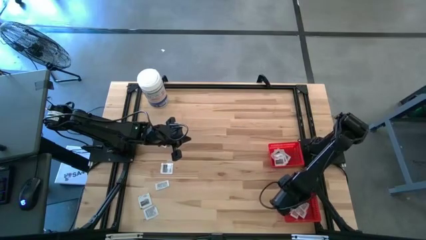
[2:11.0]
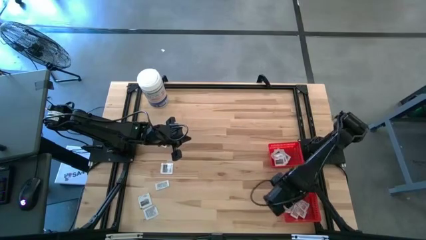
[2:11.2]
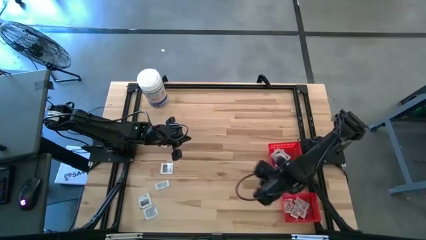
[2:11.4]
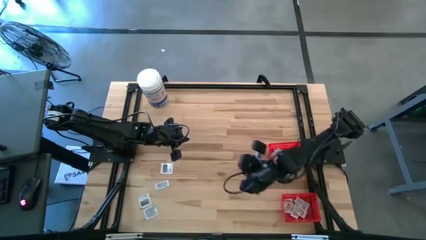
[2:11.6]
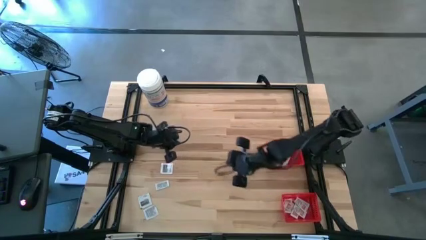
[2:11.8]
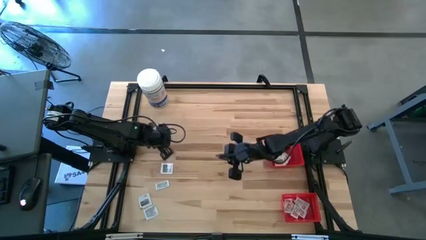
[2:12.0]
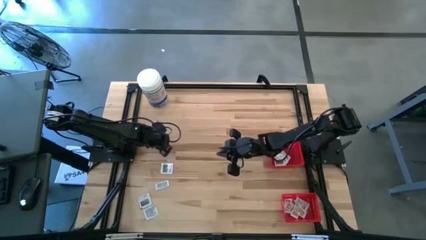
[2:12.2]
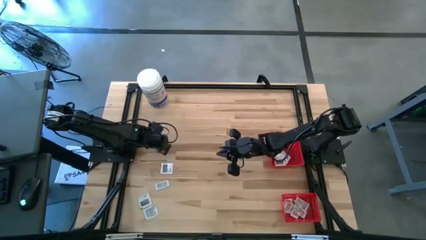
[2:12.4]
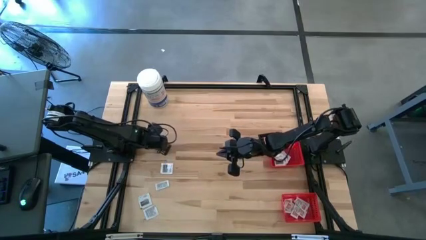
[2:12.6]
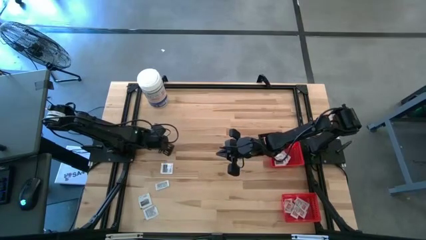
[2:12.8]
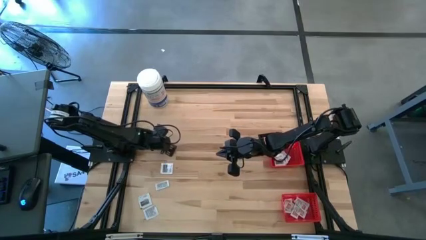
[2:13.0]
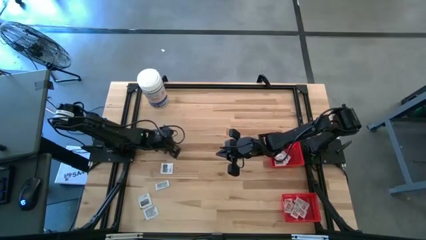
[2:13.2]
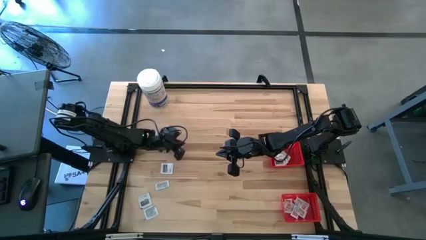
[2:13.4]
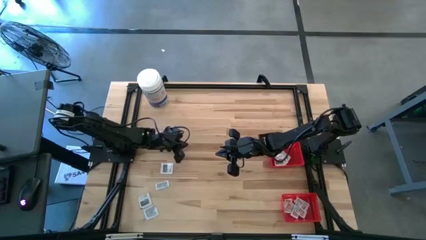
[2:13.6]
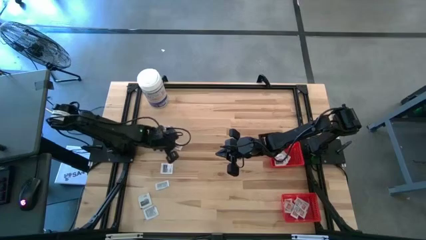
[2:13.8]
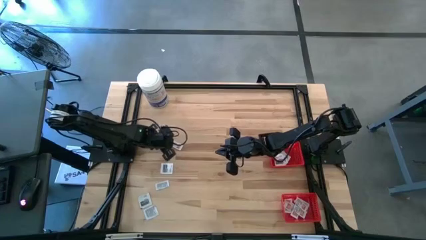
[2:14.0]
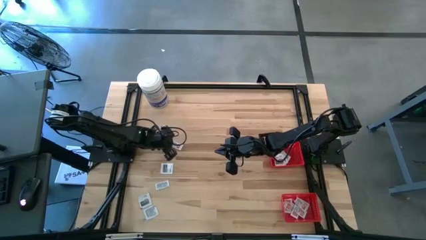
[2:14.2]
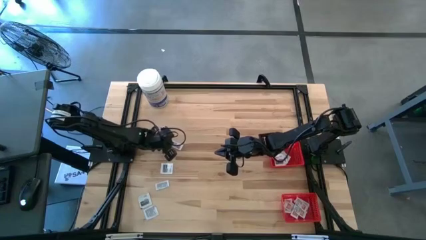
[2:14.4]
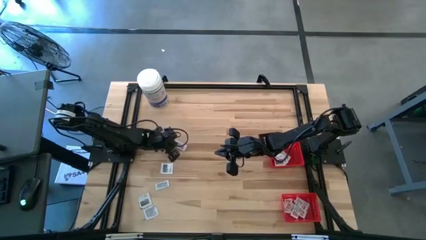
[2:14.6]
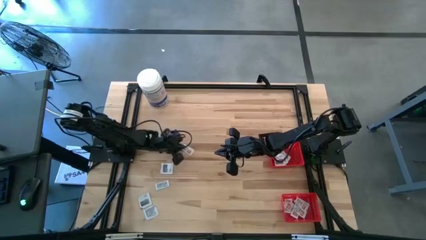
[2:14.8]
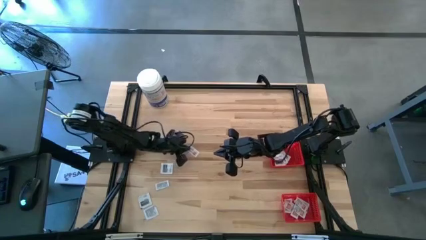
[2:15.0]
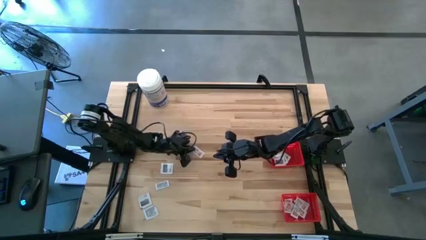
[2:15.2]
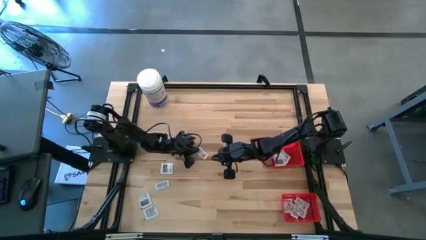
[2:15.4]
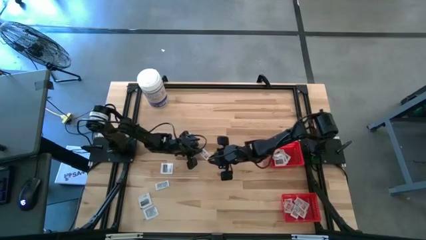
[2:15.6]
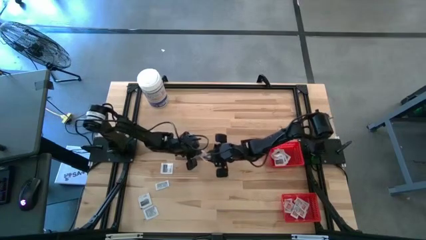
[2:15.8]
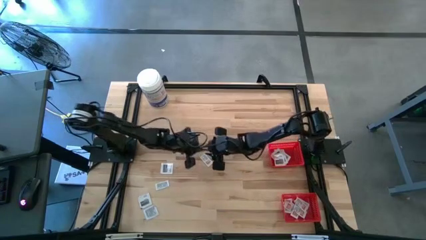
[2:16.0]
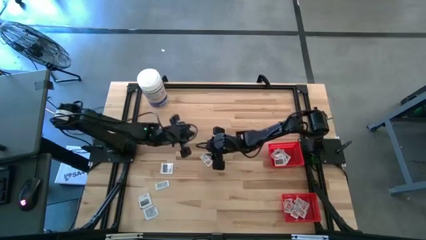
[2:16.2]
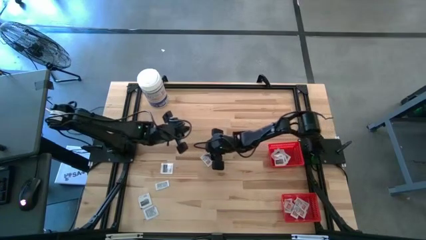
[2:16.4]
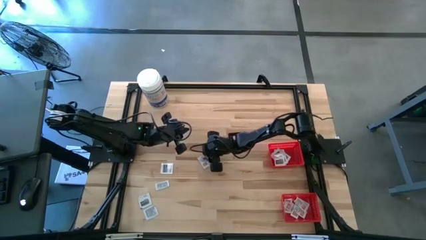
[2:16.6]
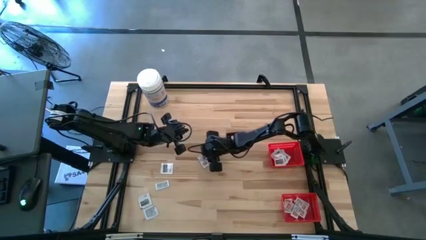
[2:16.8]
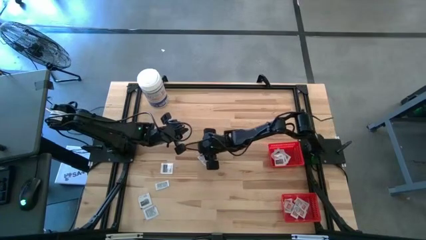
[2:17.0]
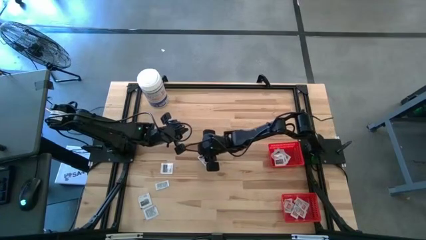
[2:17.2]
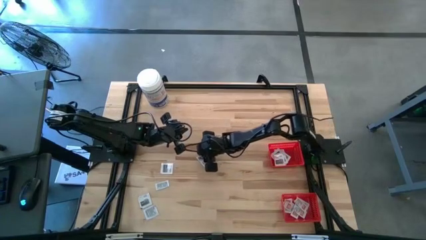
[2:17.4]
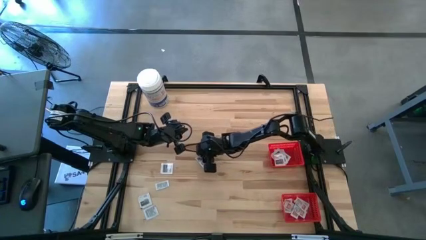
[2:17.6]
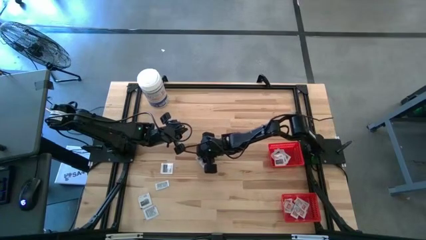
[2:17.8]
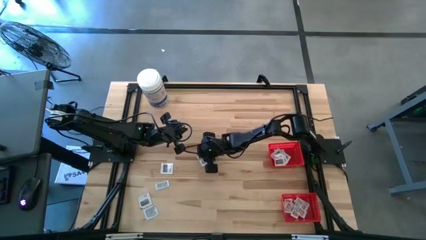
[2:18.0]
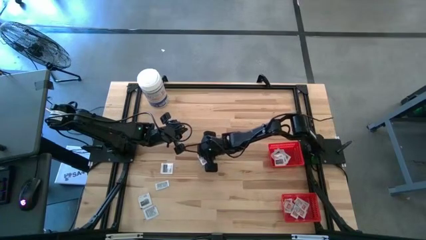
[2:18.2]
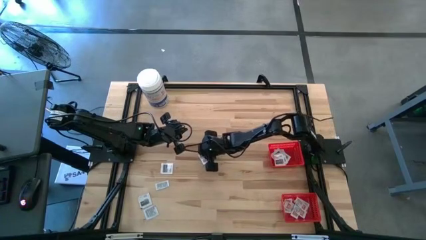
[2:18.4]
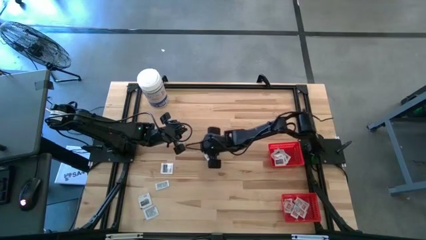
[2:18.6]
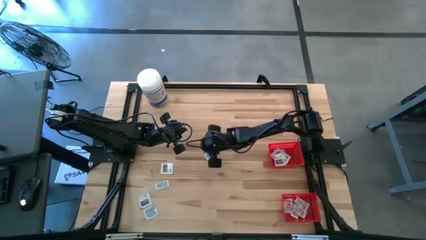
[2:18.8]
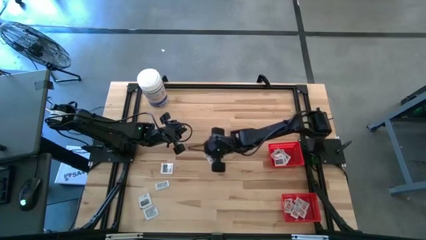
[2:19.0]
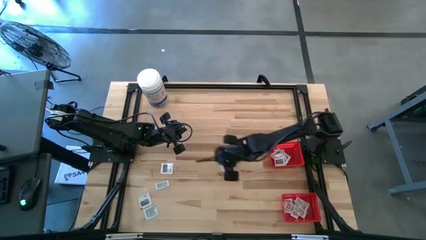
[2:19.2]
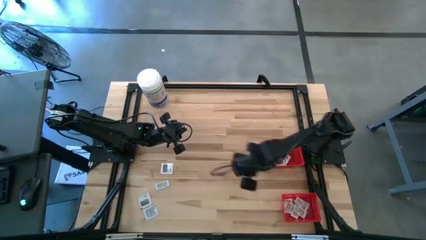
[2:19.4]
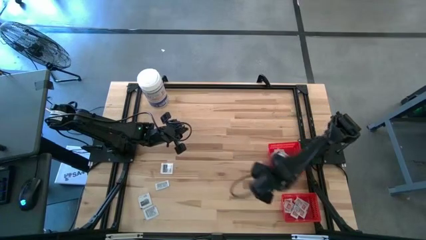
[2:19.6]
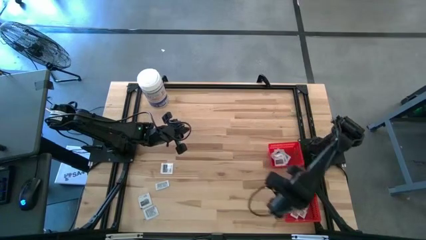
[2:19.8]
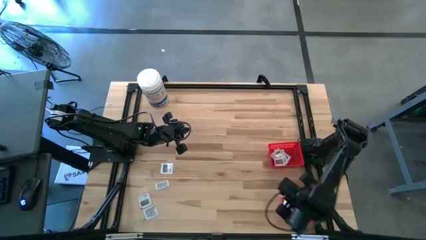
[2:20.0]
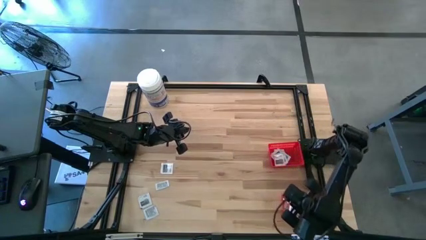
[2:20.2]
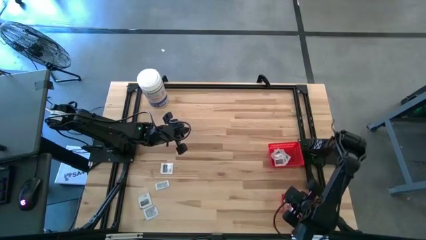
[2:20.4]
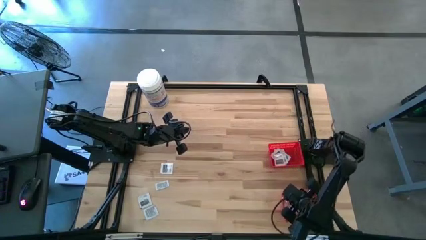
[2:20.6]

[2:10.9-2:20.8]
Task: Pick & Place First Aid Supplies
Put the orange ointment pack into the bottom red basket

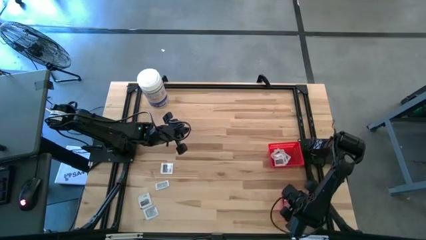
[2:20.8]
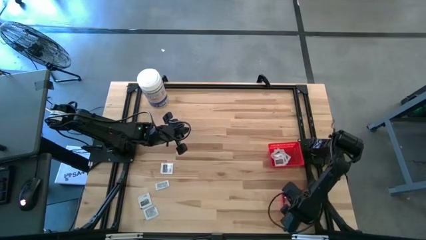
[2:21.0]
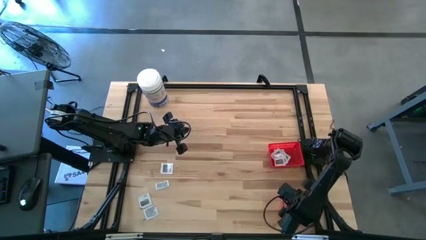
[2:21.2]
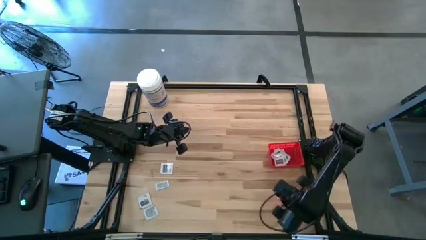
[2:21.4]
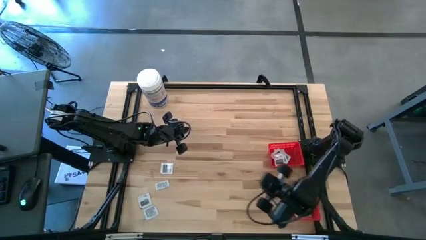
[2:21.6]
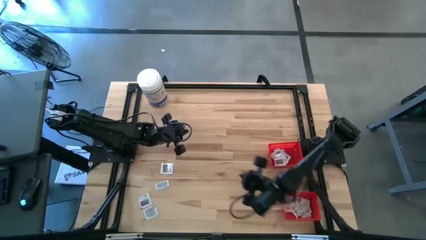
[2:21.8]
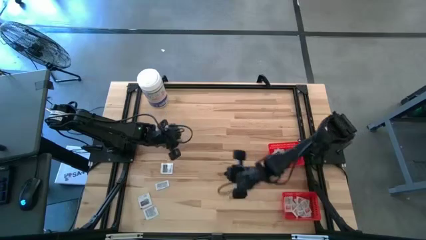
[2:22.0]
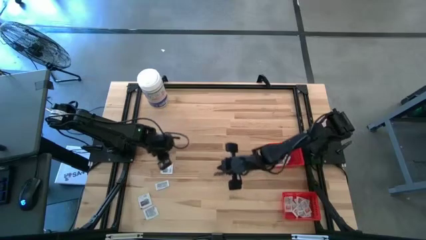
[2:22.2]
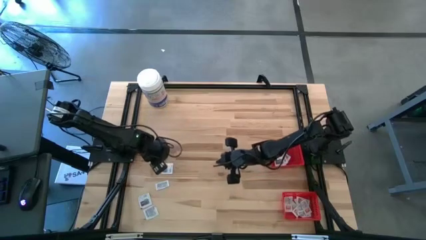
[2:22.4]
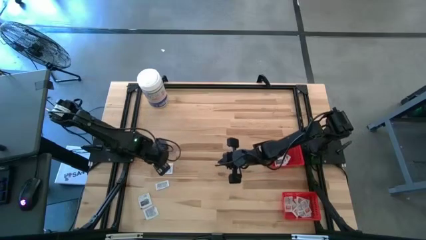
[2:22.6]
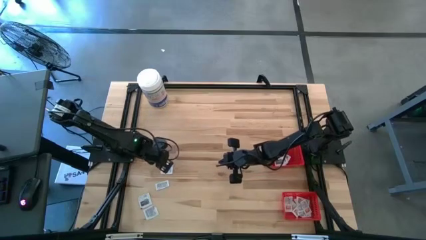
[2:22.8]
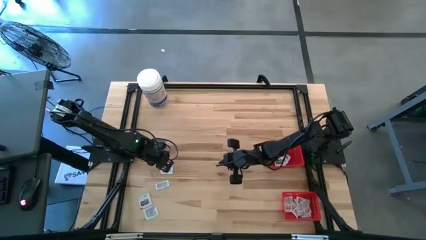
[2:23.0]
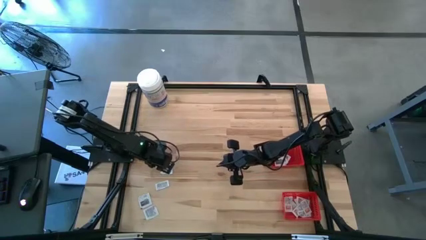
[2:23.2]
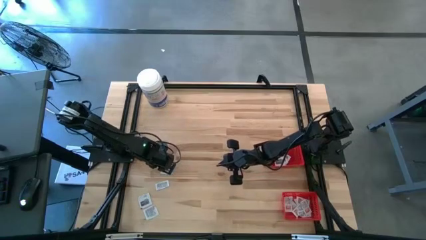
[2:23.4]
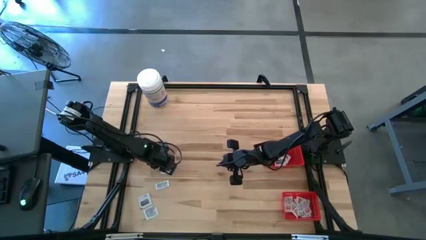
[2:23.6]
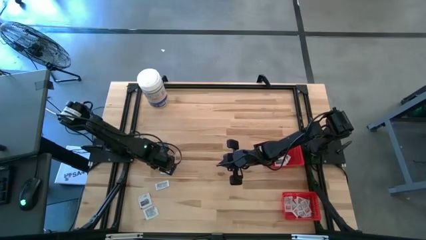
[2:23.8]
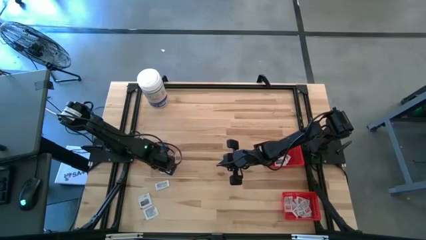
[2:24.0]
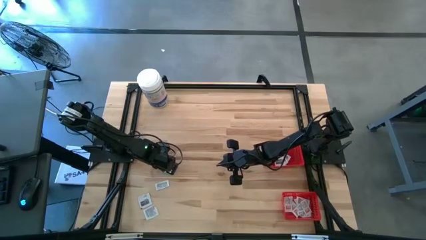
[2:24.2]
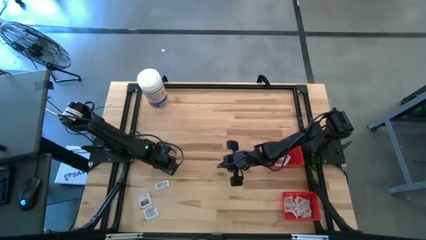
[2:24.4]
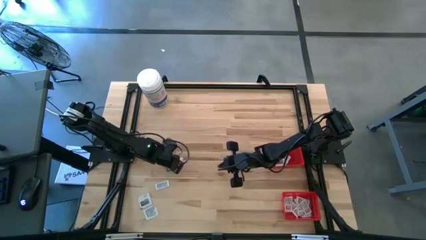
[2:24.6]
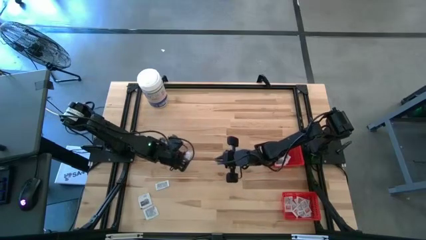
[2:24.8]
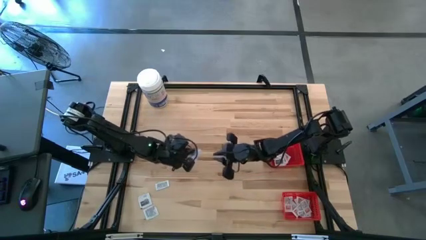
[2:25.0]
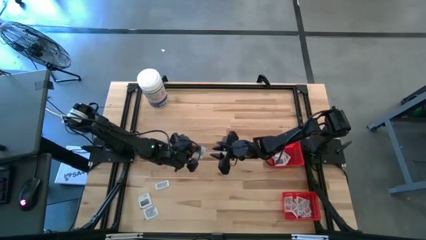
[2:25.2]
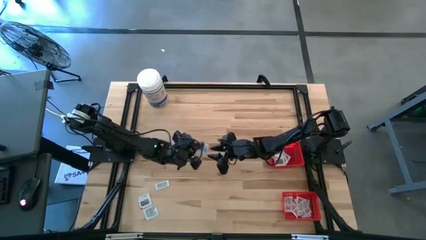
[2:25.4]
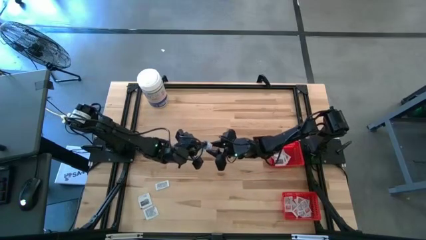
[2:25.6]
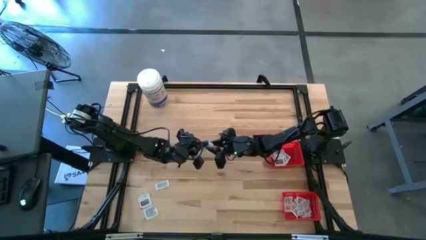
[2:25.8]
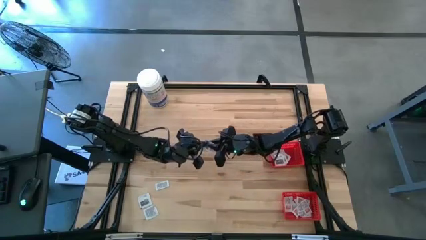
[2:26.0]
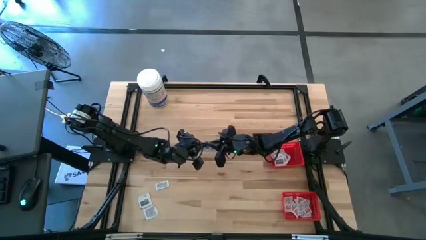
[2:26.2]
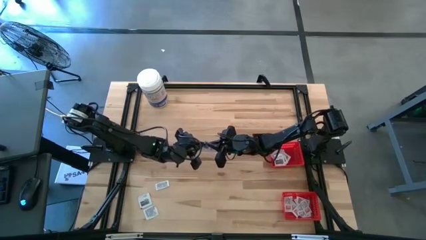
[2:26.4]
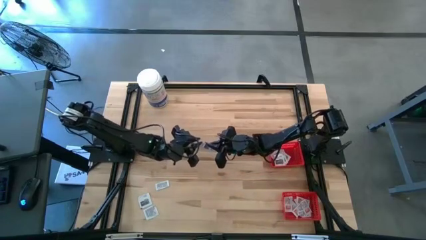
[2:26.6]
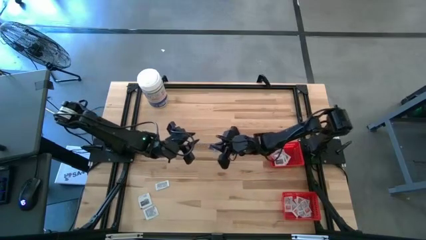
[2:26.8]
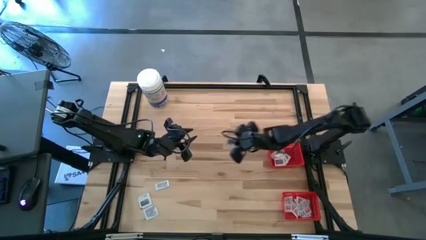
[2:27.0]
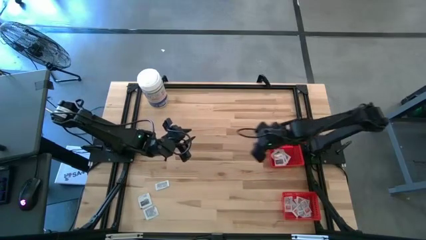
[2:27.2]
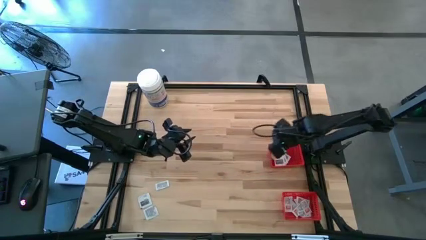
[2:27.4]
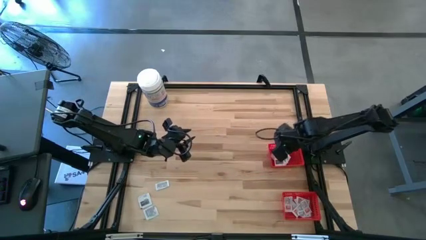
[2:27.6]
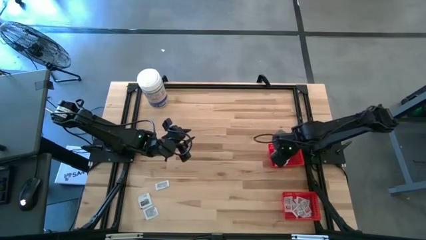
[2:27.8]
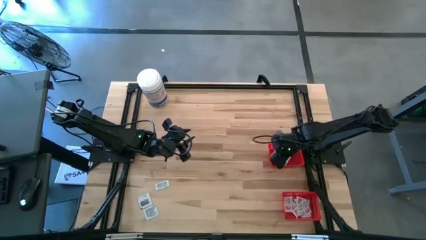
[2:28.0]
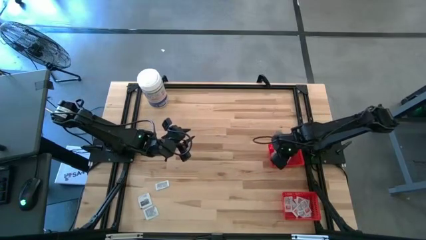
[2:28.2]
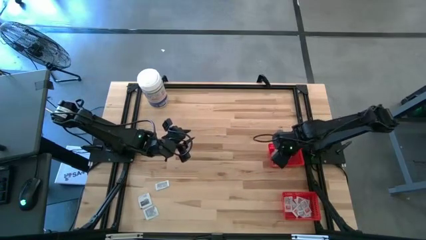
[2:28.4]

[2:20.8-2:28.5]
Put the black towelette pack into the top red basket
